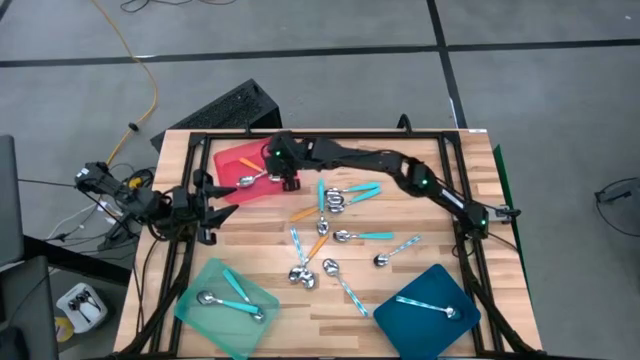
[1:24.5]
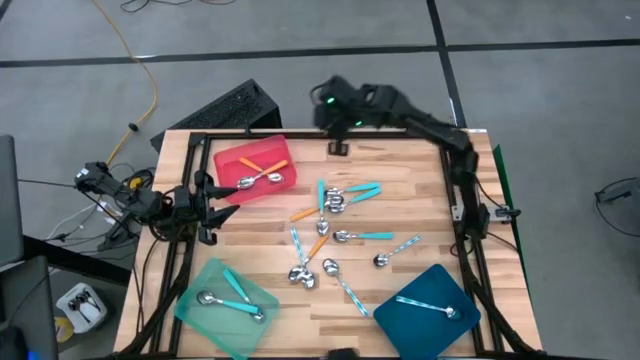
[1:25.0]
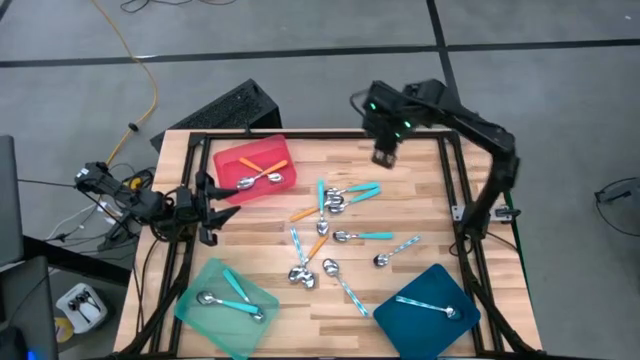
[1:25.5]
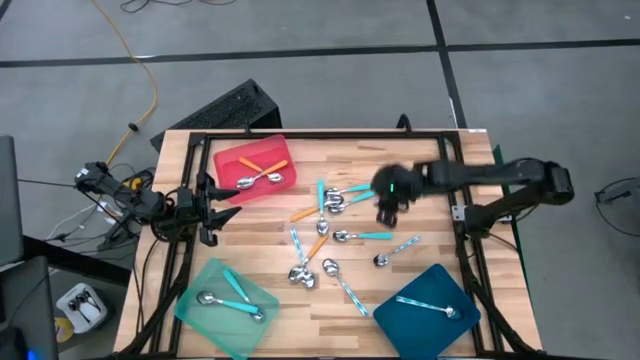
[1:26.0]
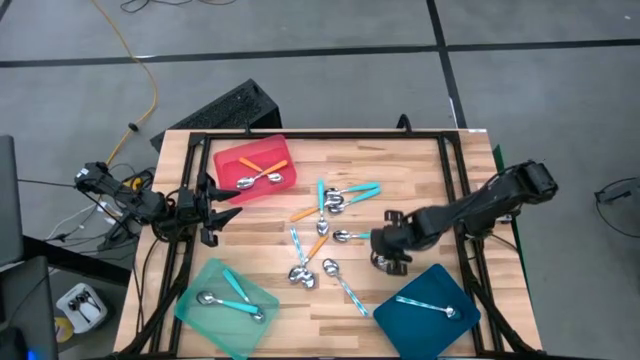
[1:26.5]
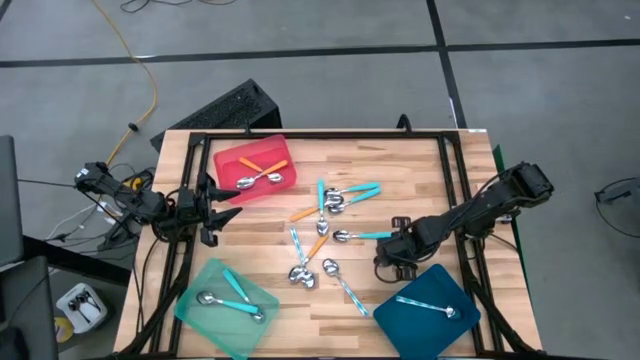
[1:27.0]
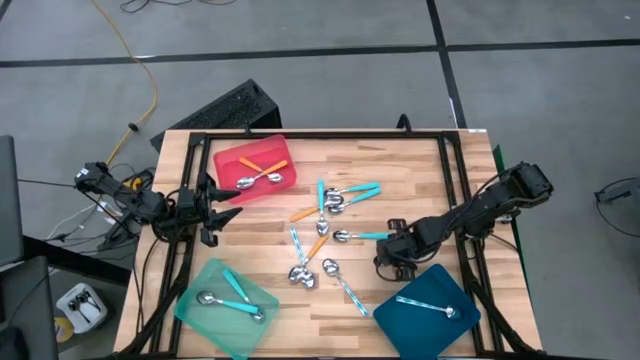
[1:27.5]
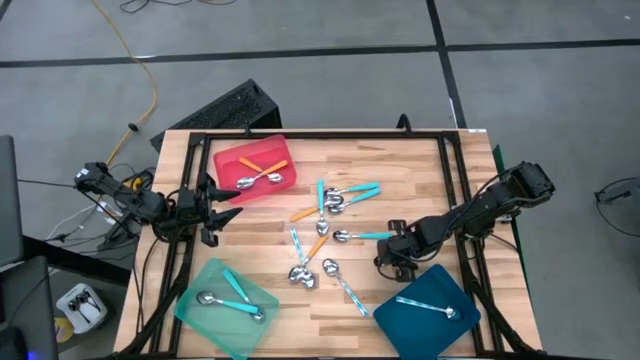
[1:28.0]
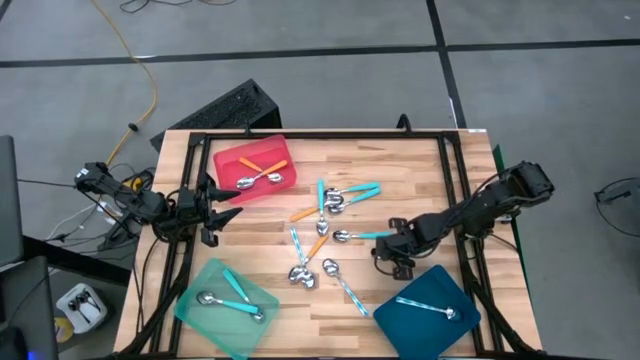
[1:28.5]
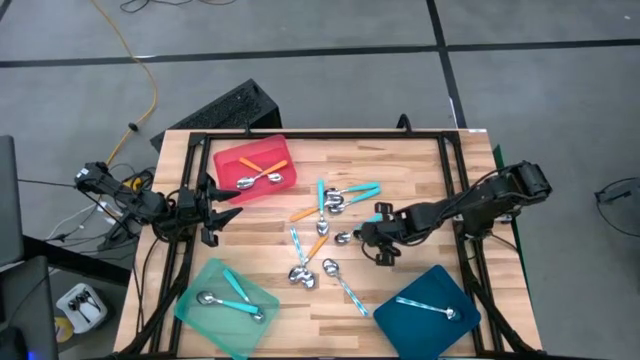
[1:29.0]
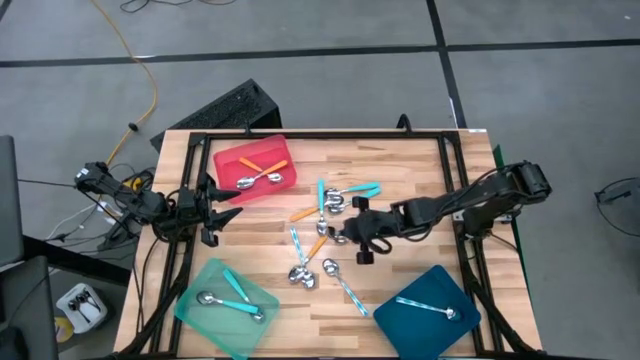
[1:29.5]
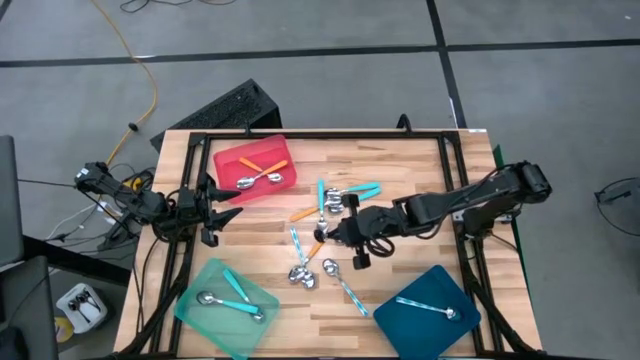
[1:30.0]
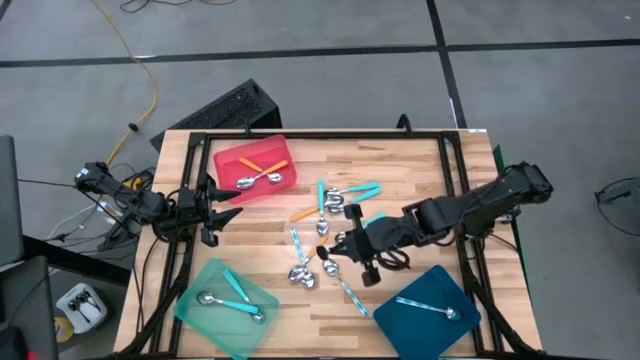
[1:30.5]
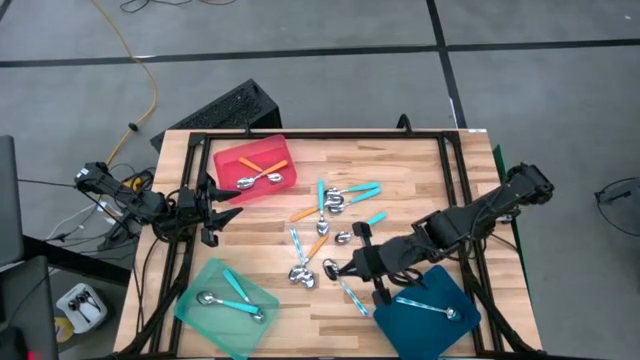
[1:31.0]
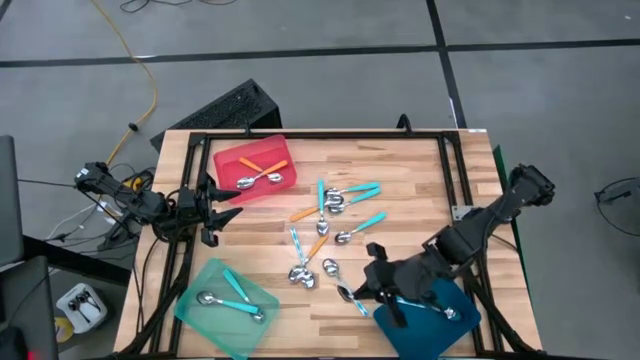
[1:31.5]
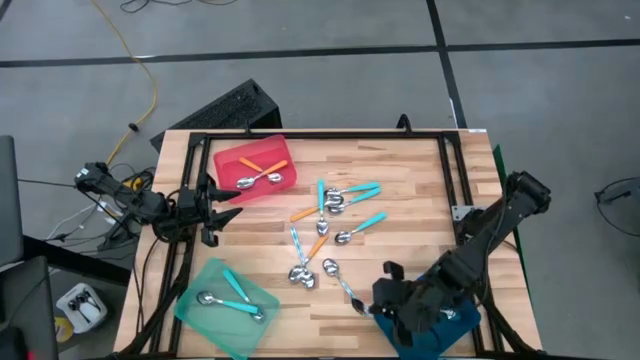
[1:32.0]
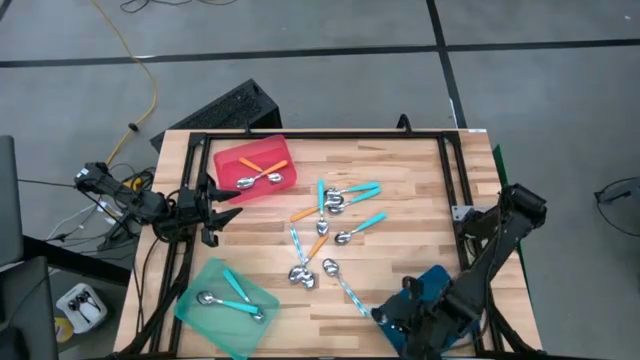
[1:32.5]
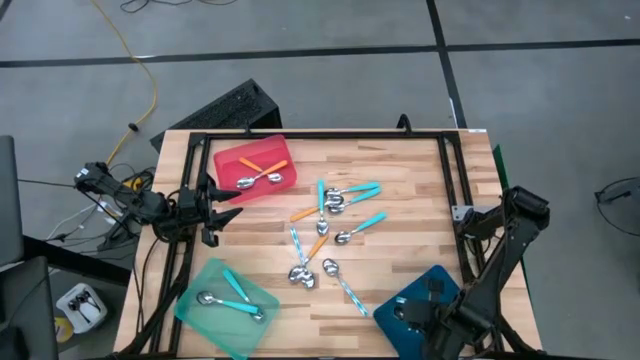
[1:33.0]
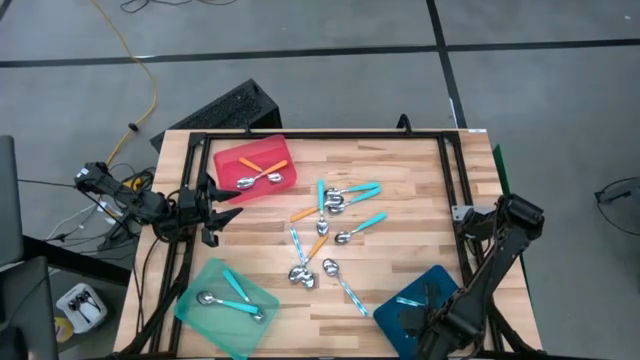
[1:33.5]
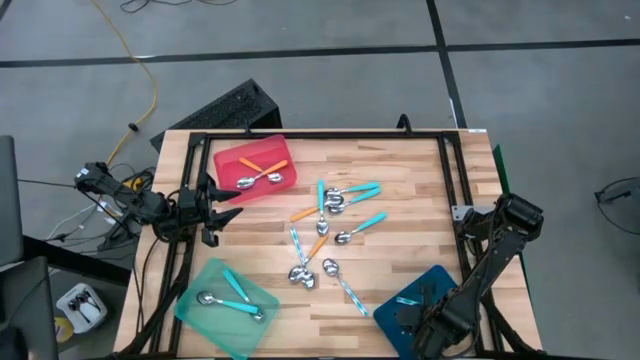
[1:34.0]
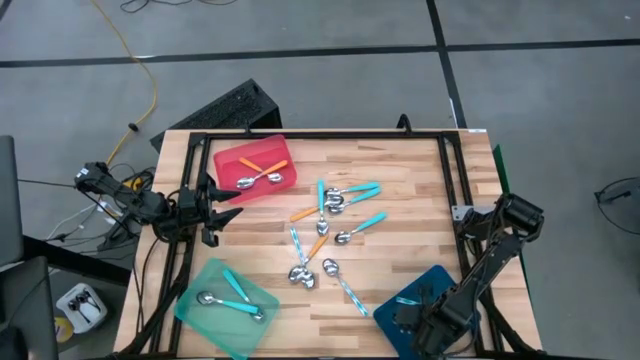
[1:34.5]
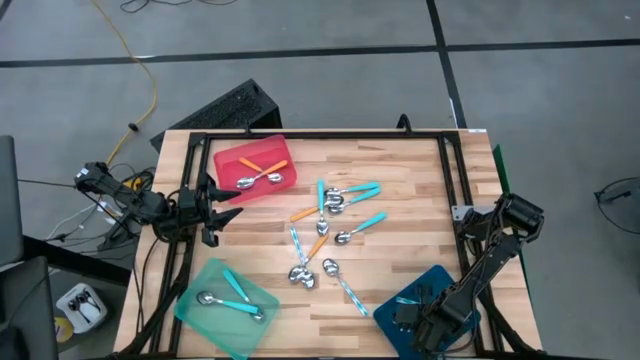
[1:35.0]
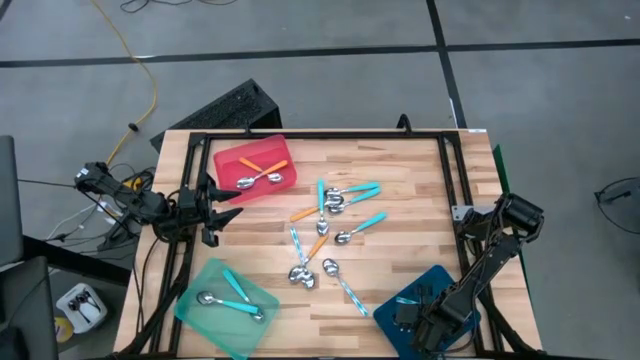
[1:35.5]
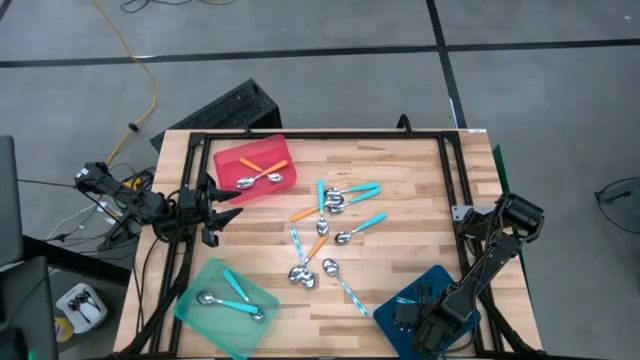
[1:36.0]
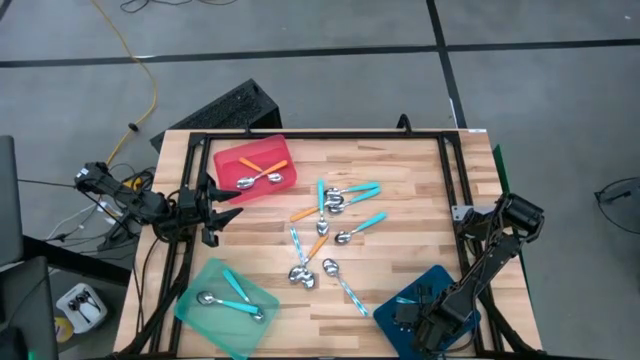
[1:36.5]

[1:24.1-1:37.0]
Task: Sort silverware by color (type)
Put the blue patterned spoon into the blue bin

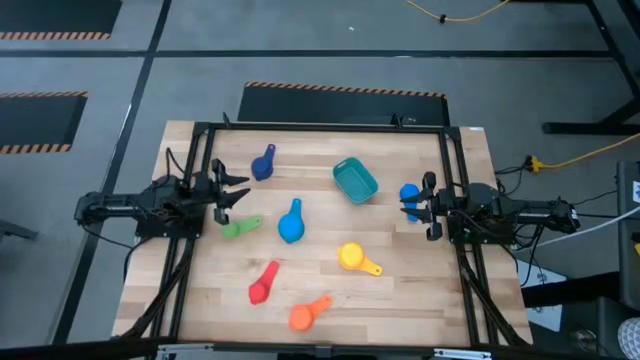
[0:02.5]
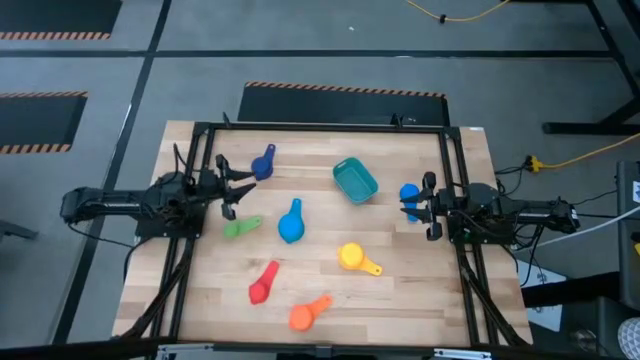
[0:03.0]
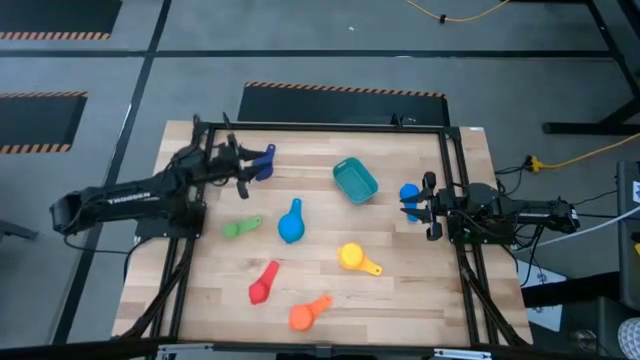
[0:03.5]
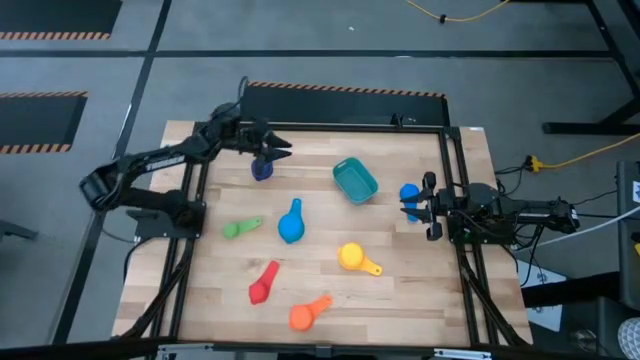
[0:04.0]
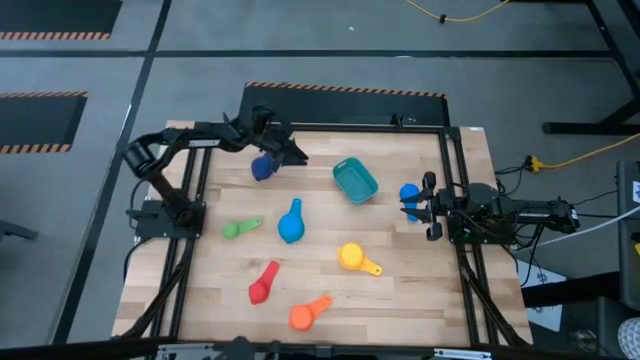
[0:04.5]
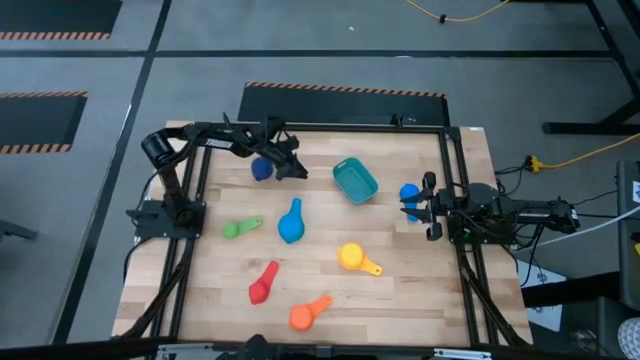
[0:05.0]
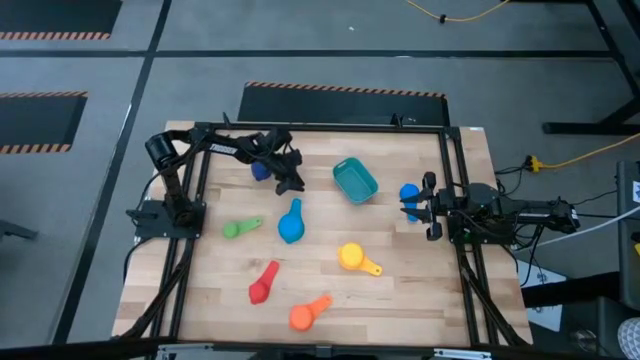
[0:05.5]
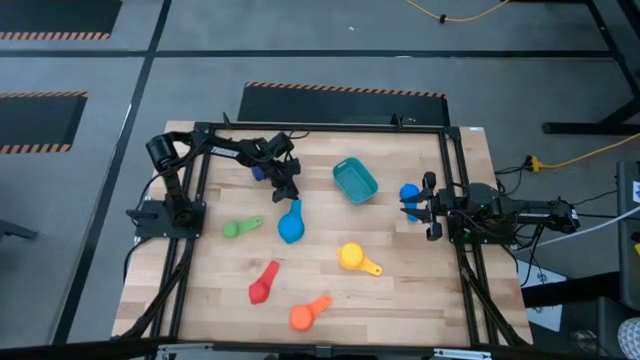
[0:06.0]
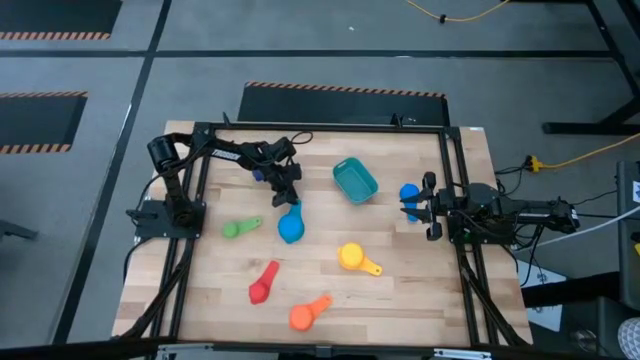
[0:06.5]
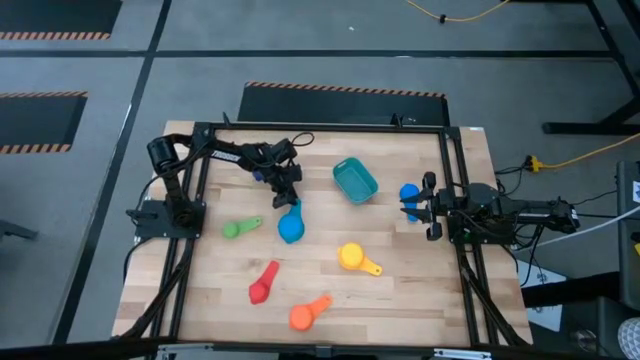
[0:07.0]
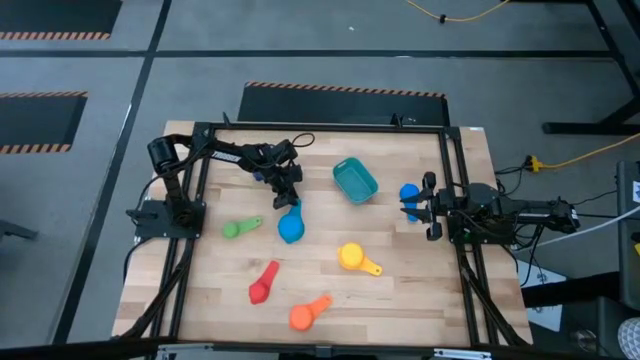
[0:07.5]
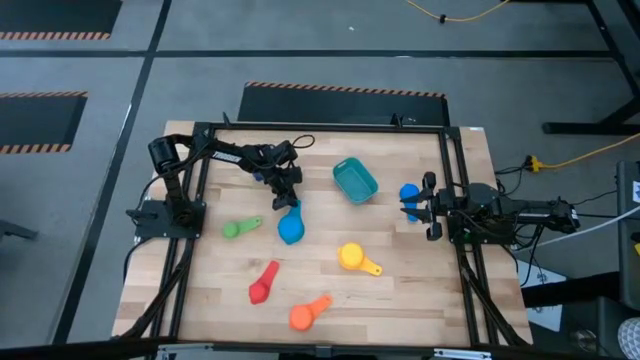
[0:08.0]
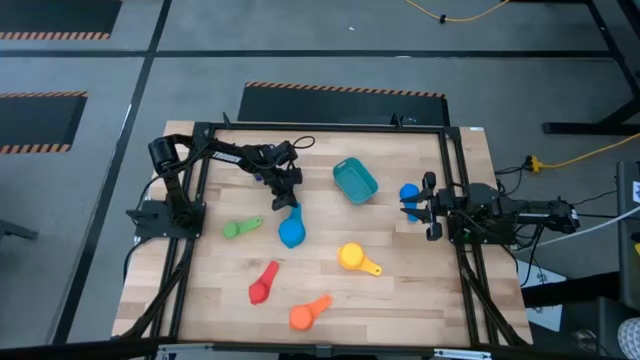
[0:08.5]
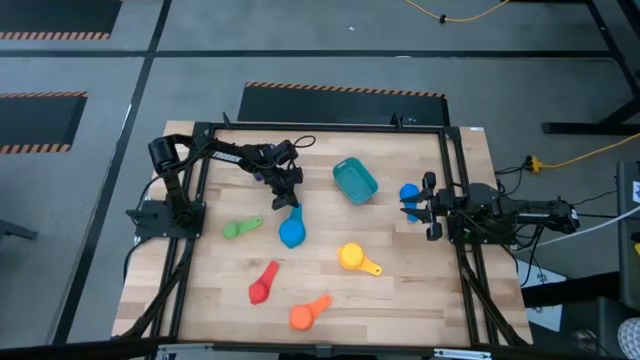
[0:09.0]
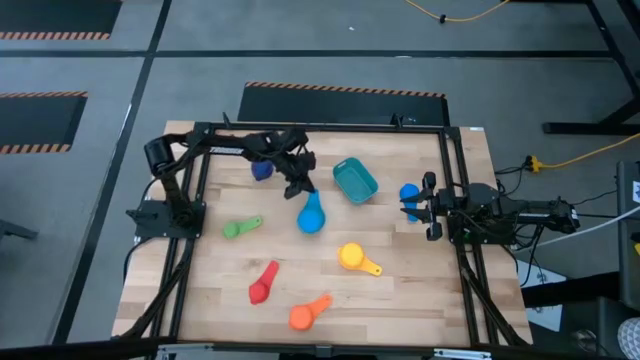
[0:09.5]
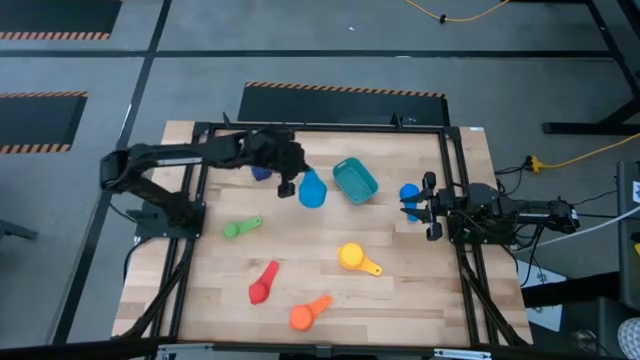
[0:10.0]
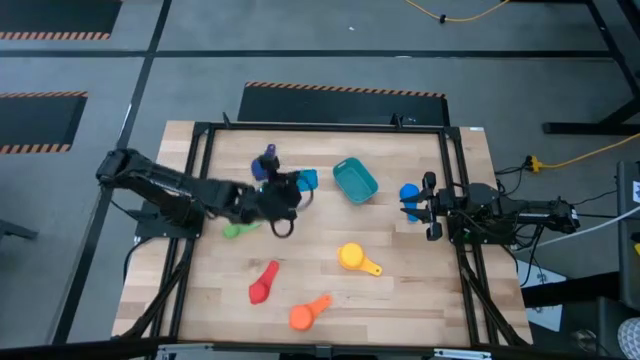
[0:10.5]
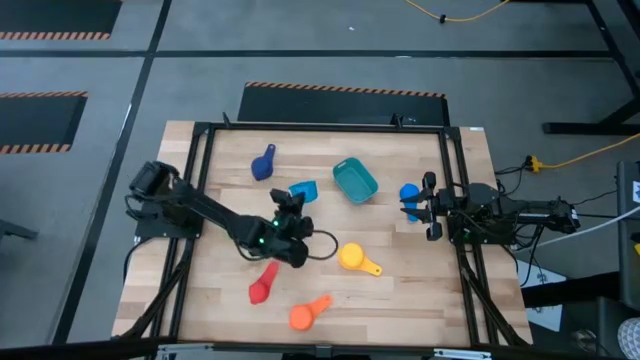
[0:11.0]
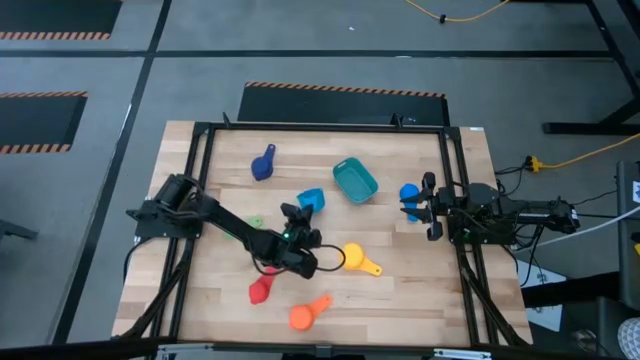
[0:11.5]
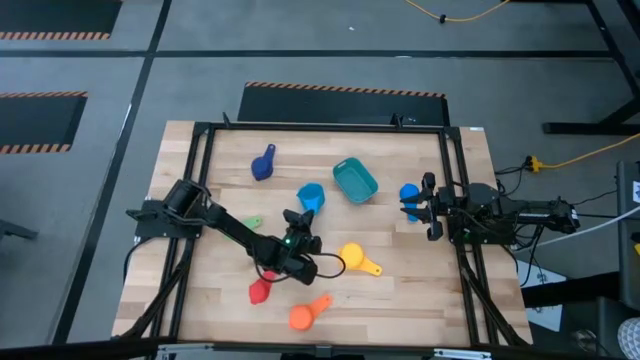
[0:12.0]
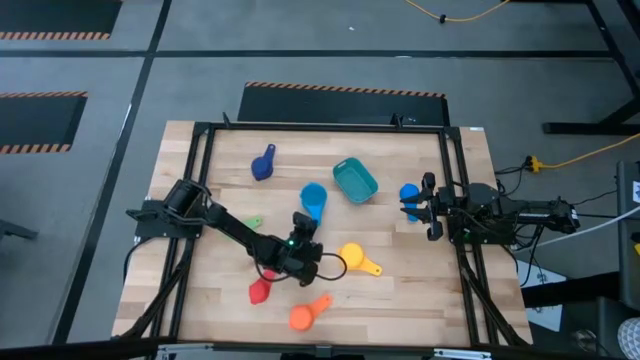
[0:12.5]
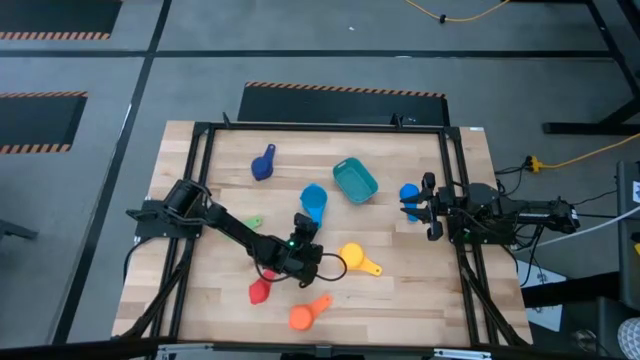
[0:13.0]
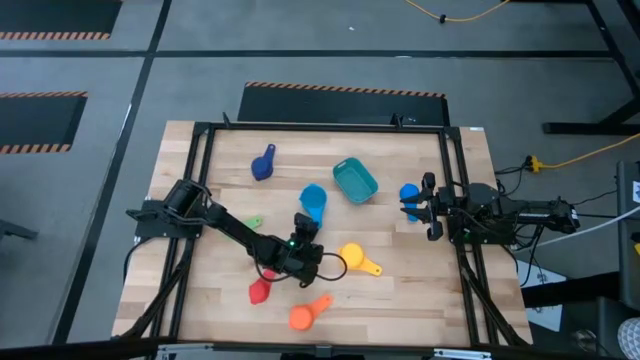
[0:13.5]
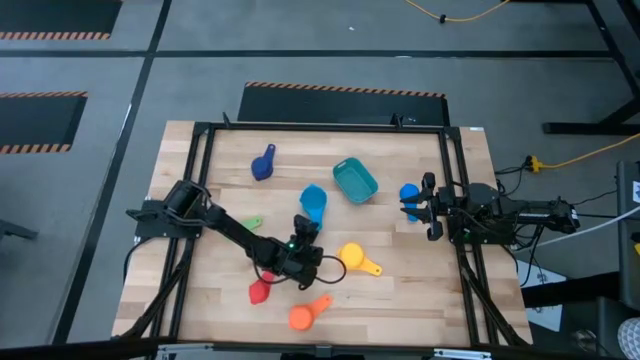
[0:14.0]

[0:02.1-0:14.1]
Task: Nest measuring cups in basket
Prepare the light blue measuring cup
